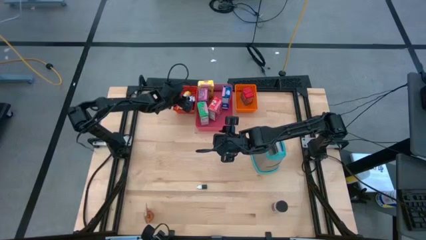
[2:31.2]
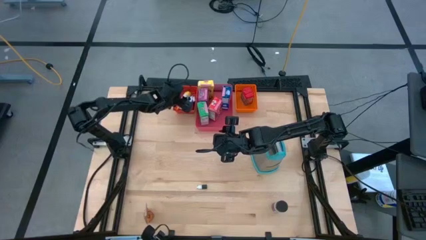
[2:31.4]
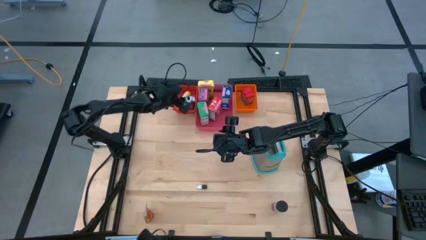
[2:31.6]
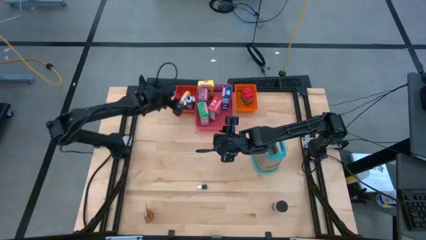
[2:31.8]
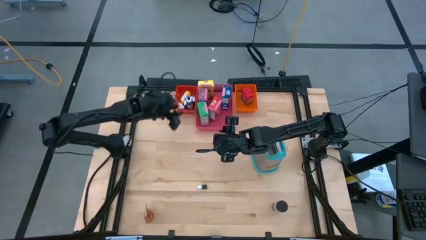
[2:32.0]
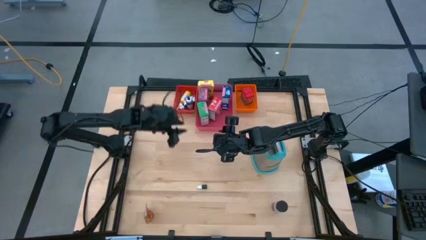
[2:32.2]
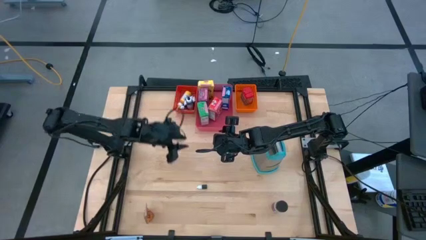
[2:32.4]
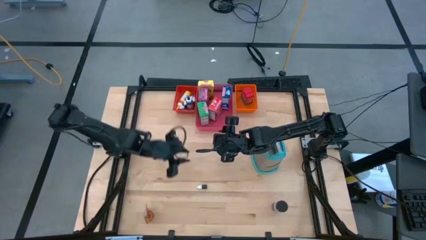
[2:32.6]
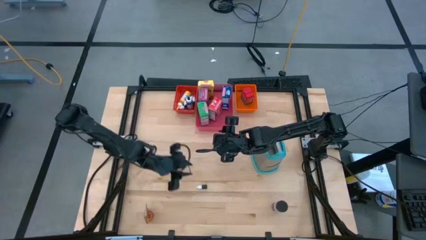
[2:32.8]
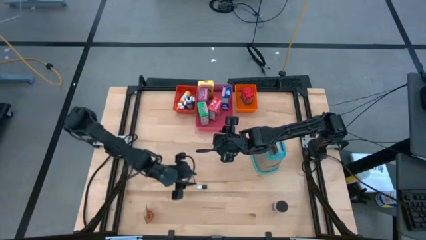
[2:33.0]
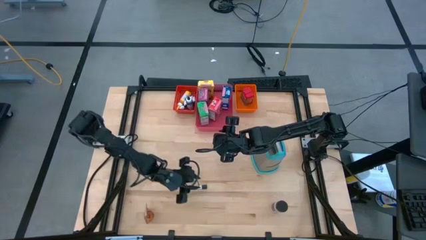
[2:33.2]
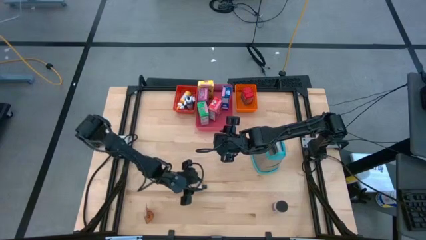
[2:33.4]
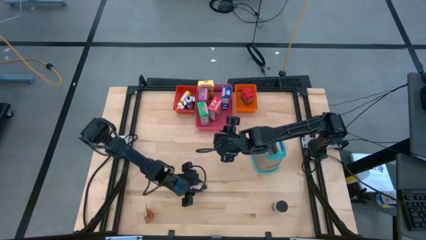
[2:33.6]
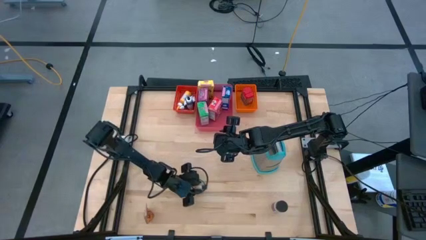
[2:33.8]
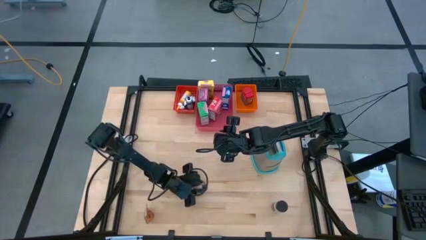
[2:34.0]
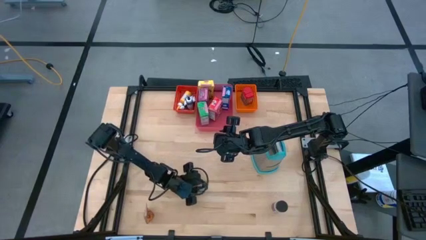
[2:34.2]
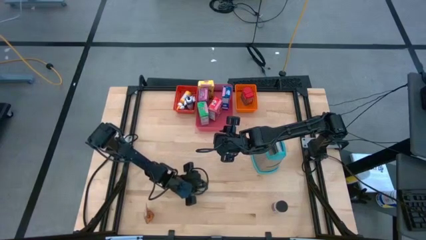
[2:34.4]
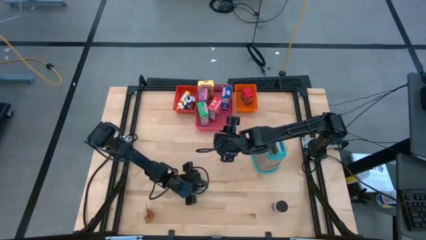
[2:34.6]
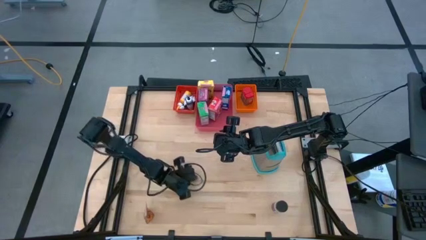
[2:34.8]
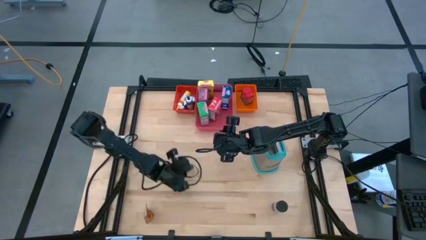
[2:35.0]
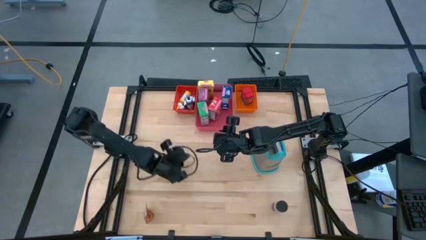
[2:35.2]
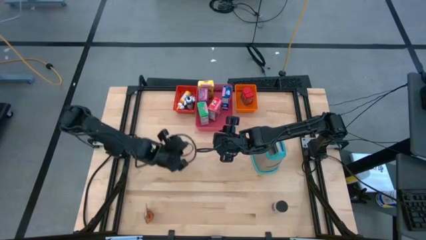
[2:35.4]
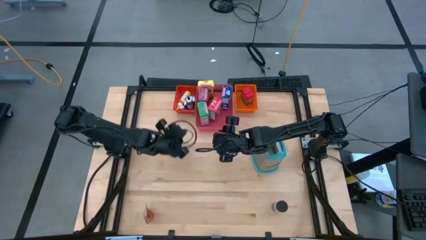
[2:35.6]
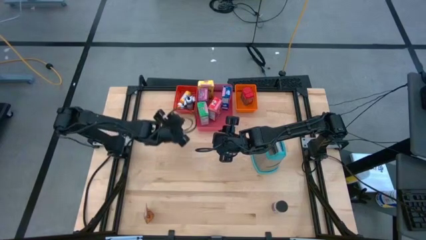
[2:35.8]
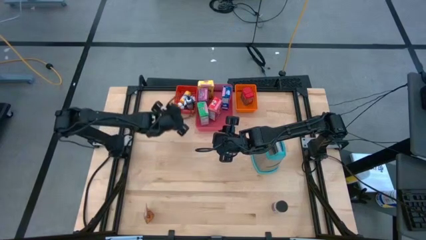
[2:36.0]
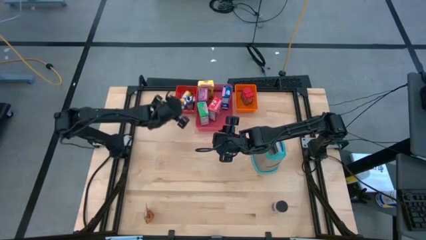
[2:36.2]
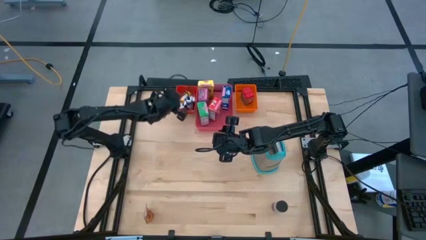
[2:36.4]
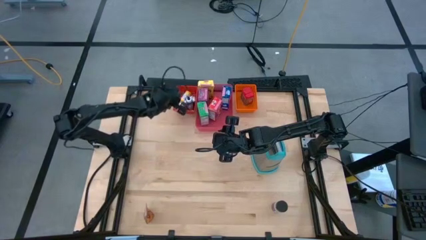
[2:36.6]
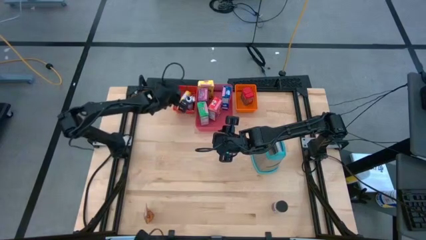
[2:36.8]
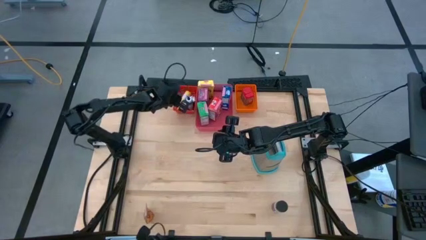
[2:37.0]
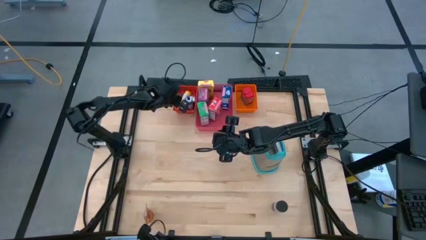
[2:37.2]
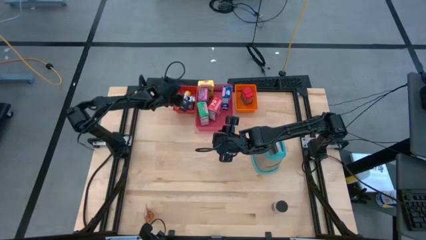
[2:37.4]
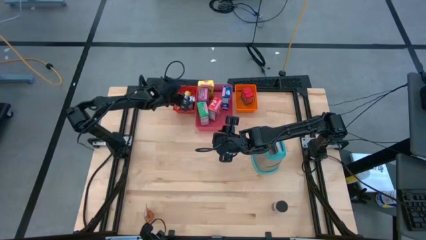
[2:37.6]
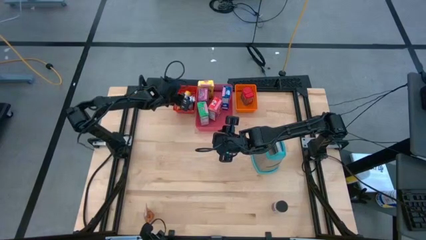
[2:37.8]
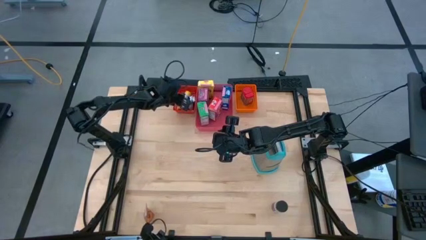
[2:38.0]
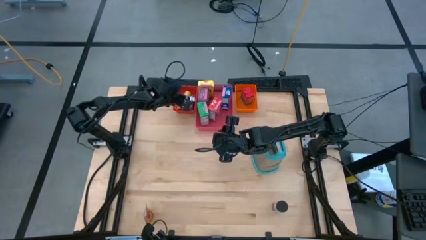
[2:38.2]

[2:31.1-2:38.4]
Task: Pick & Place Kitchen Items
Put the small black food coloring bottle into the red bin

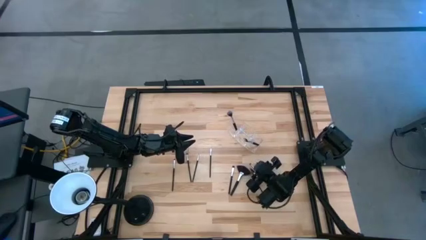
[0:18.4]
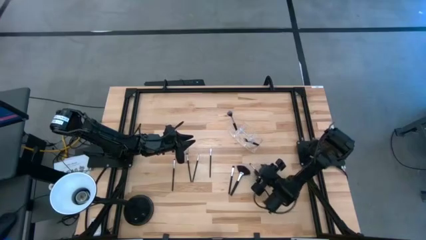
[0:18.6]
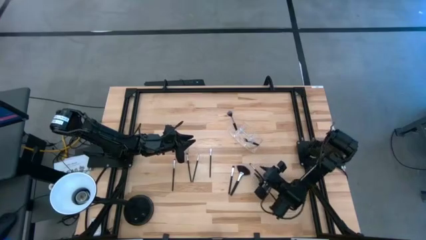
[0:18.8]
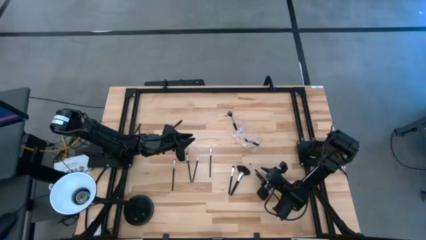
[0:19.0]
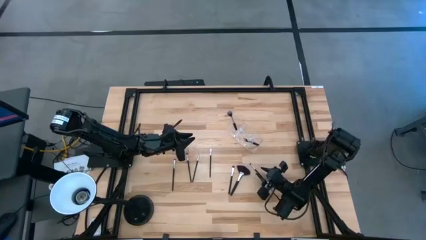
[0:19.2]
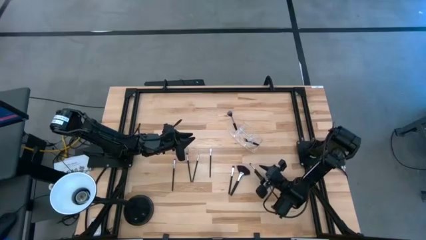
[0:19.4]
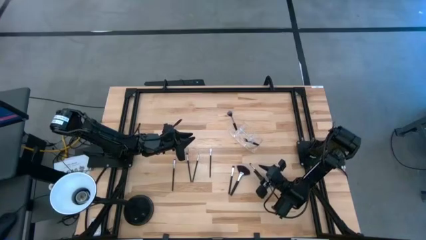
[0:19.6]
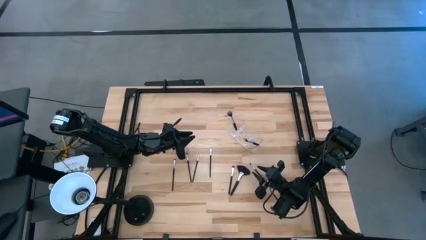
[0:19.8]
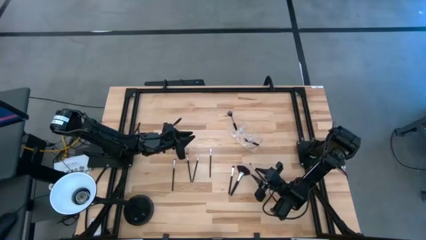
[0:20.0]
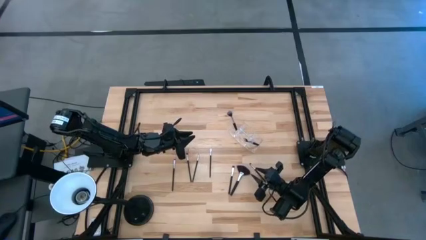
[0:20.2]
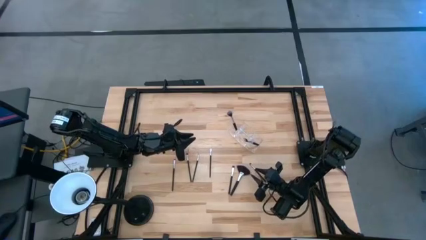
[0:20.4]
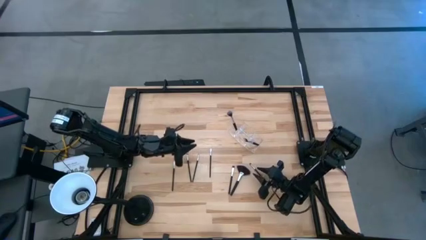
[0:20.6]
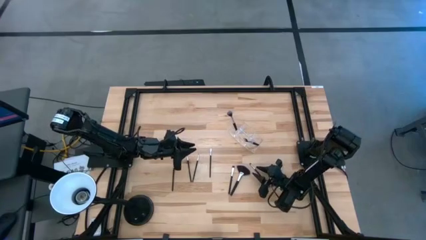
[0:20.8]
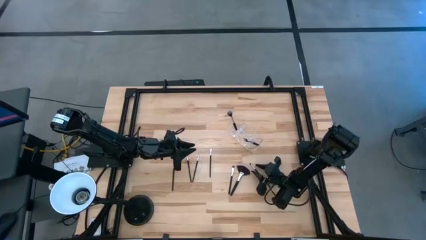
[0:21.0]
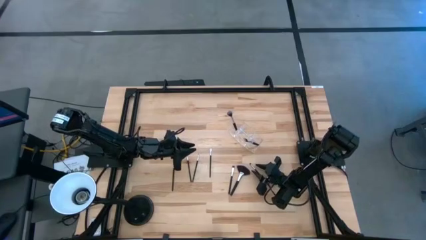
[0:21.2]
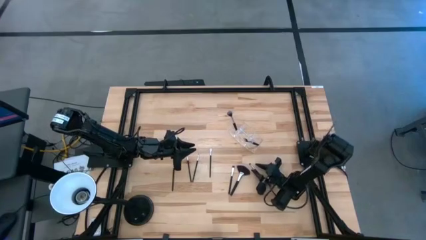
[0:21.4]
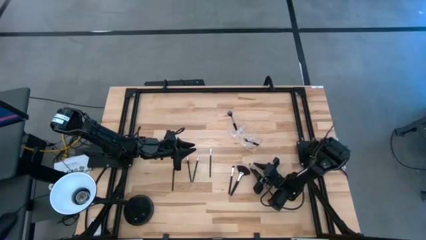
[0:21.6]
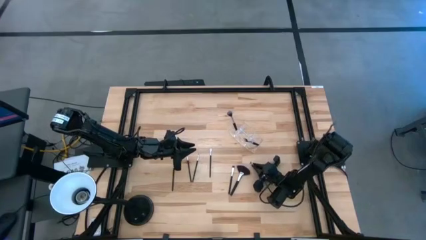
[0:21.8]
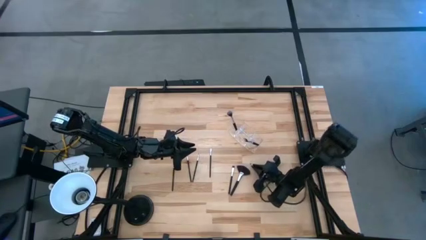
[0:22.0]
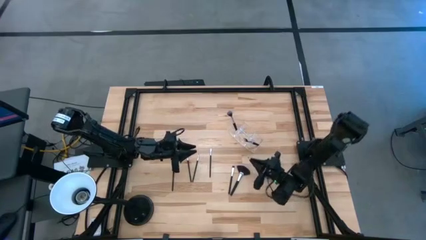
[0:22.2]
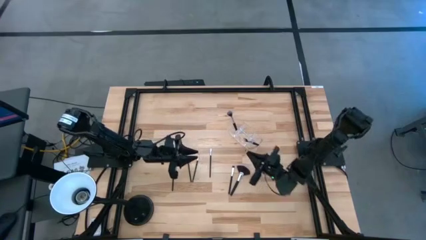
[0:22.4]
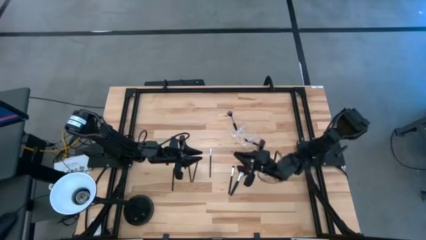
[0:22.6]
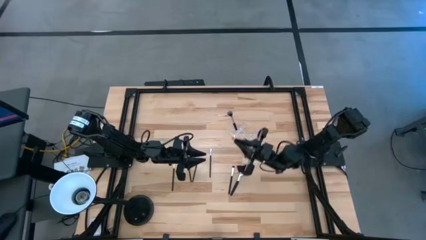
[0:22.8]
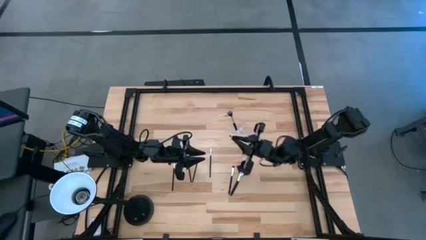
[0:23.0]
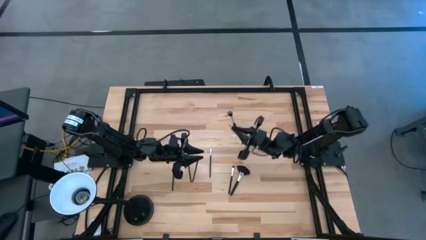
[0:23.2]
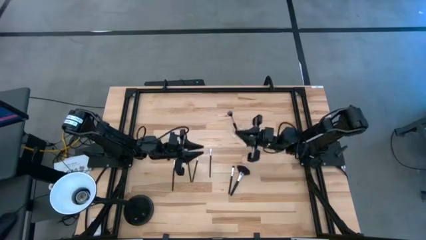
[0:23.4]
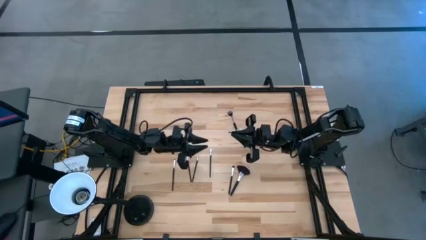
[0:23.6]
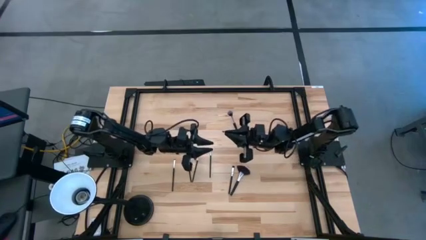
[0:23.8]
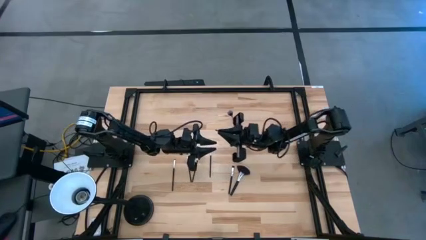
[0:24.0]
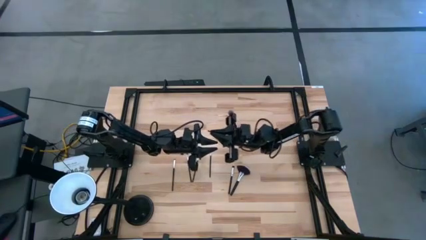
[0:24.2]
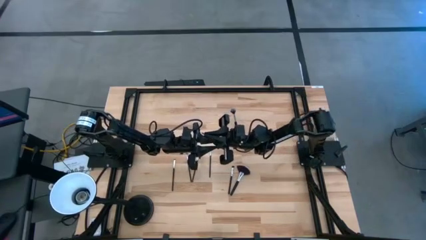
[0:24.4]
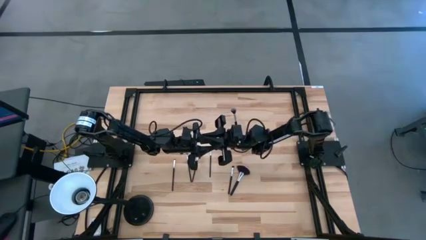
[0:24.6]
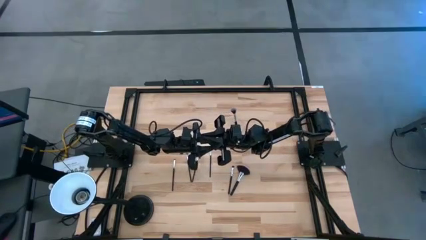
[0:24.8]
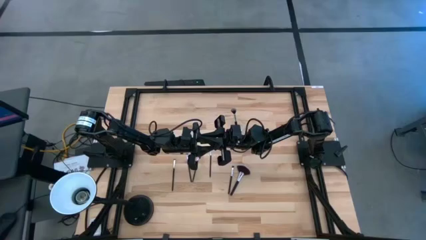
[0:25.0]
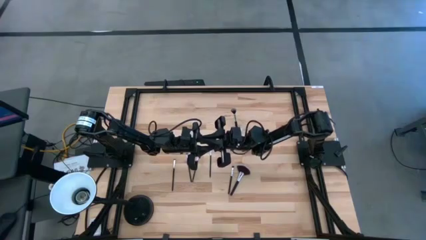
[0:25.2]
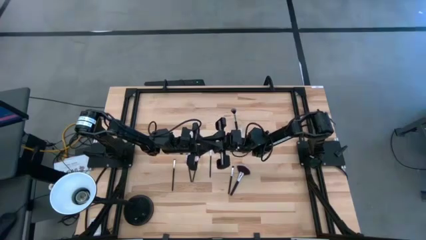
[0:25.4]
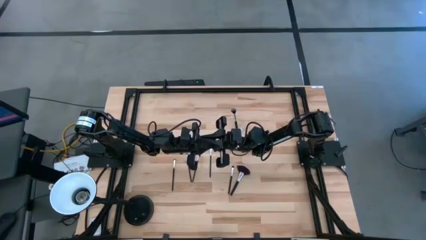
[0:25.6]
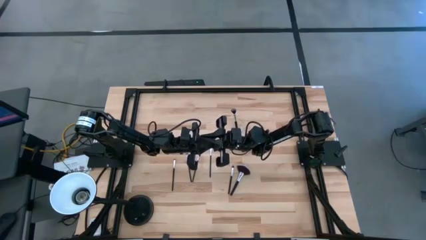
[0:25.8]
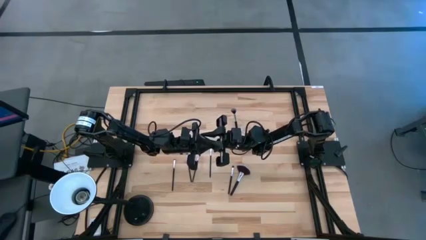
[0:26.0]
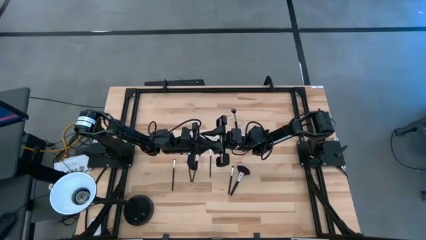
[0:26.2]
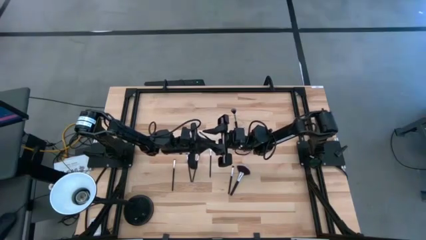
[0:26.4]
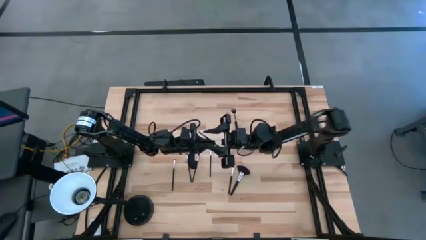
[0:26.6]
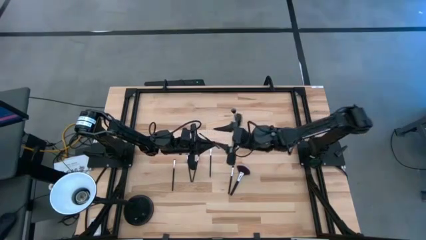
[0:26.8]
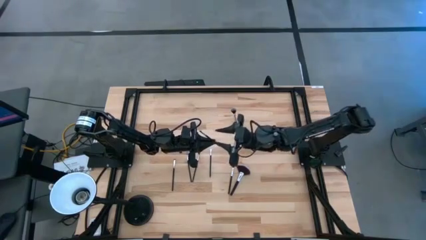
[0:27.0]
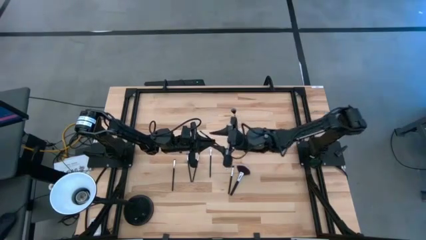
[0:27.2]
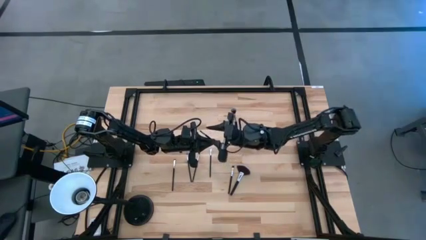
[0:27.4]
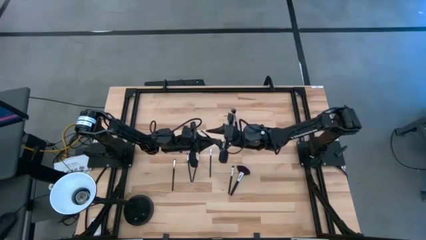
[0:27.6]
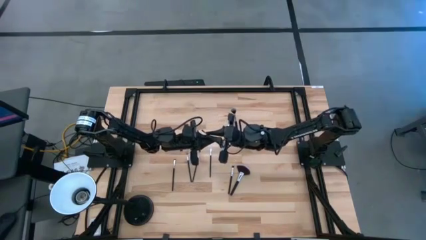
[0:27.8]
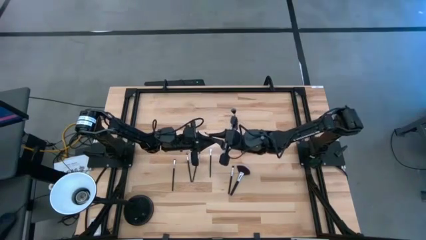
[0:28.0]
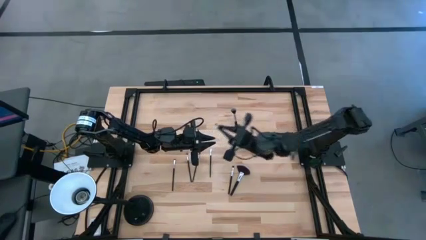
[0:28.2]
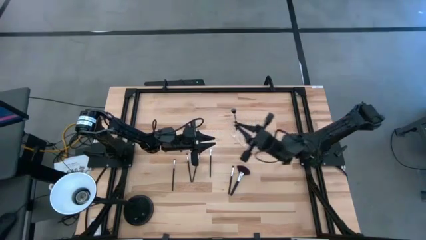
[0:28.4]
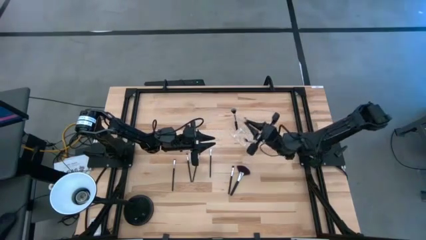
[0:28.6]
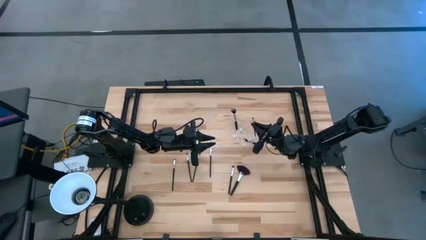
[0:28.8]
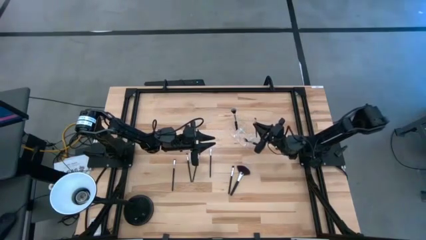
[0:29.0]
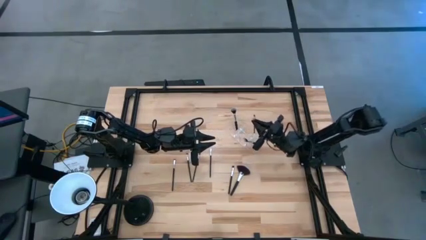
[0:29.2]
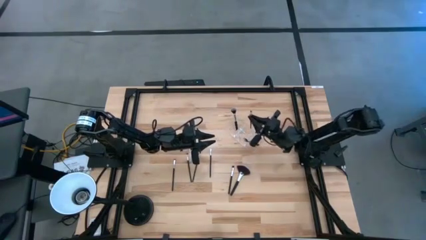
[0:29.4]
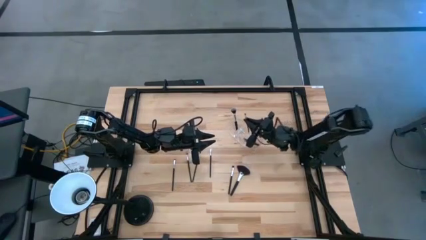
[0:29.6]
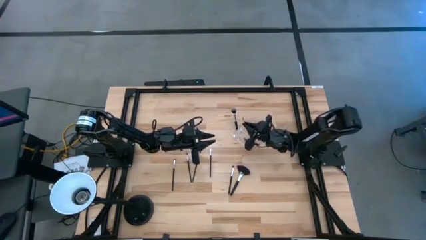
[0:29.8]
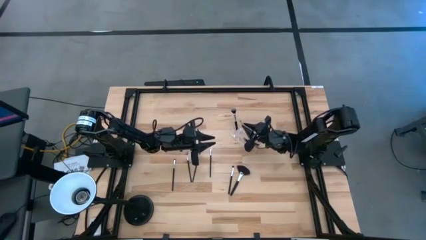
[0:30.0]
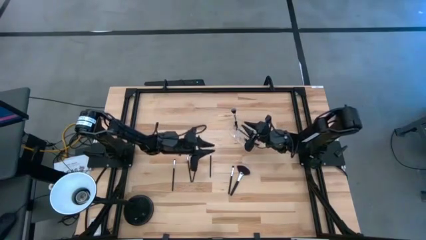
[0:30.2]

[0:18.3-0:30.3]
Task: Put items in baskets/containers
Put the eyeshadow brush into the transparent organizer
